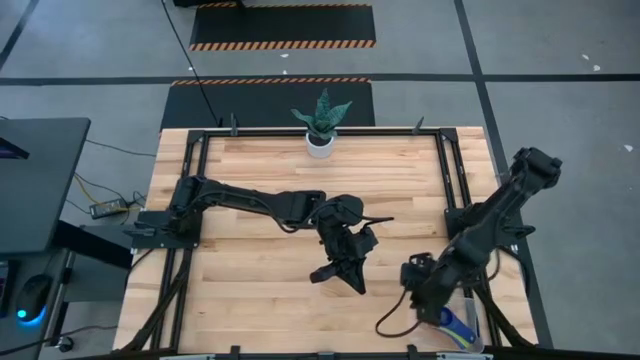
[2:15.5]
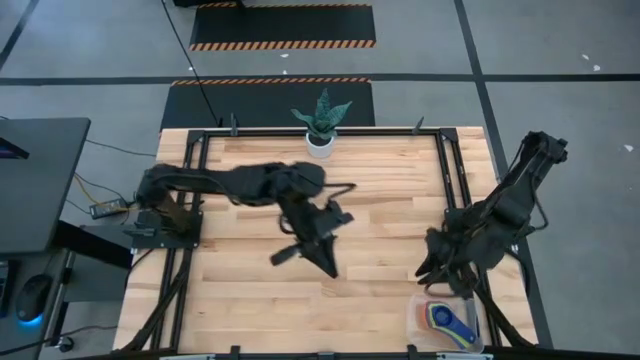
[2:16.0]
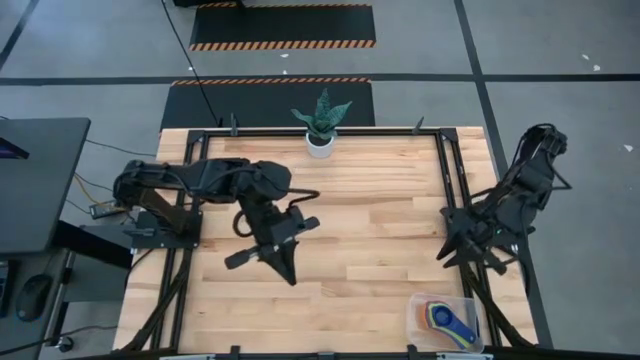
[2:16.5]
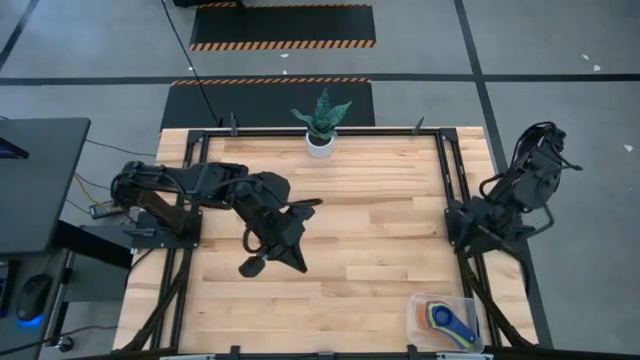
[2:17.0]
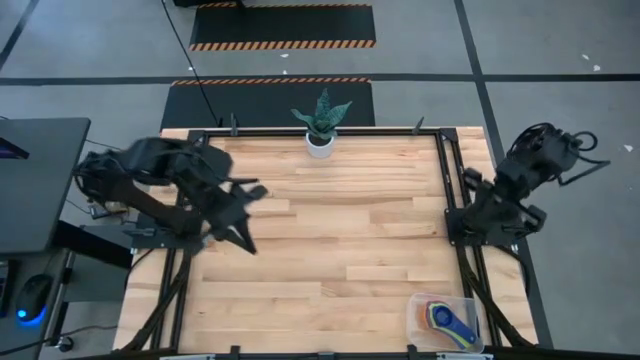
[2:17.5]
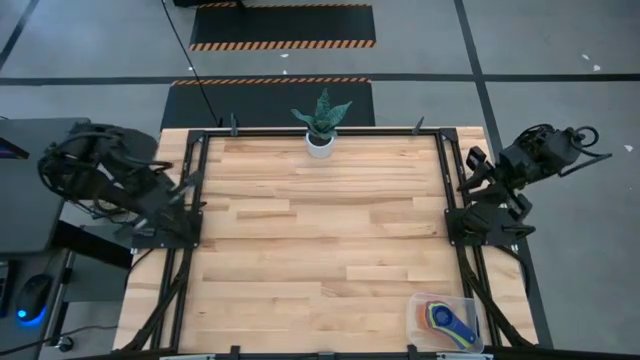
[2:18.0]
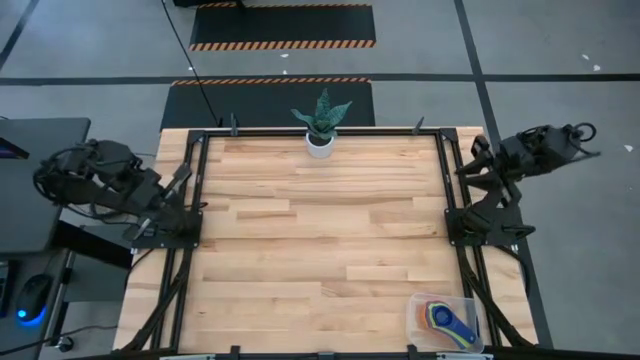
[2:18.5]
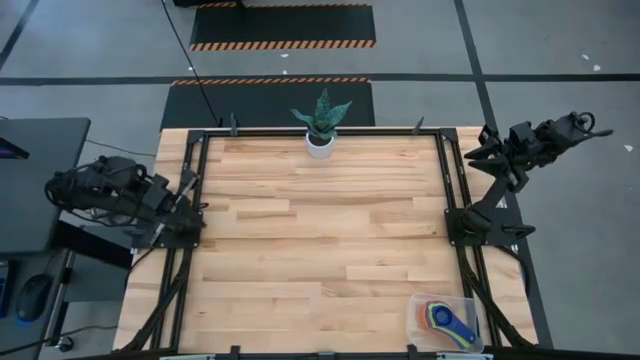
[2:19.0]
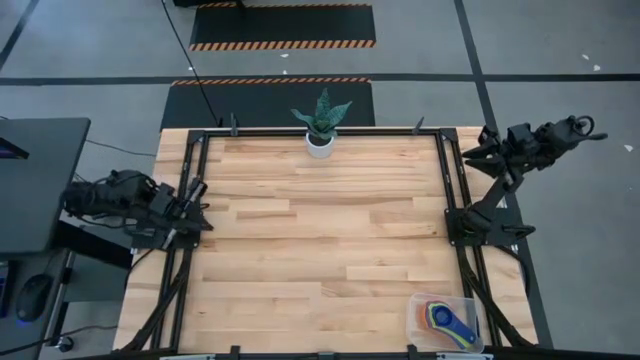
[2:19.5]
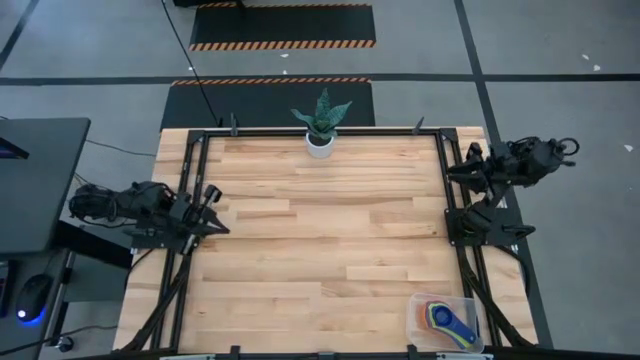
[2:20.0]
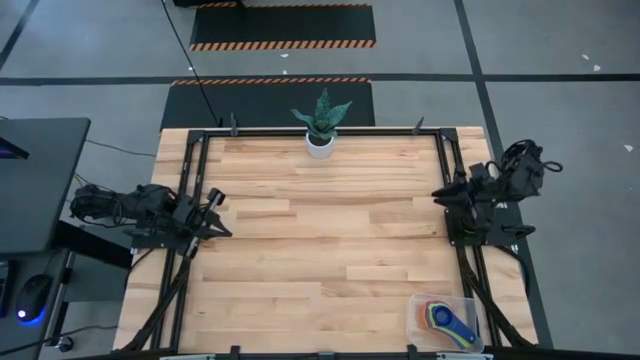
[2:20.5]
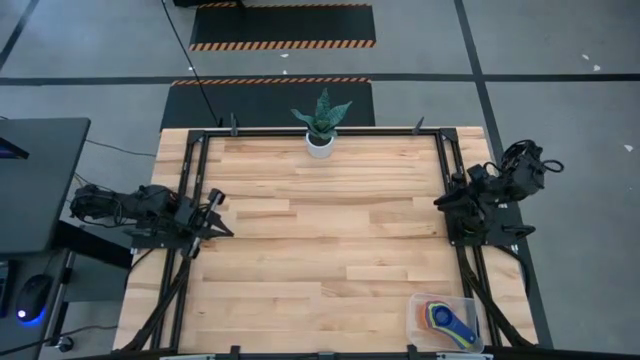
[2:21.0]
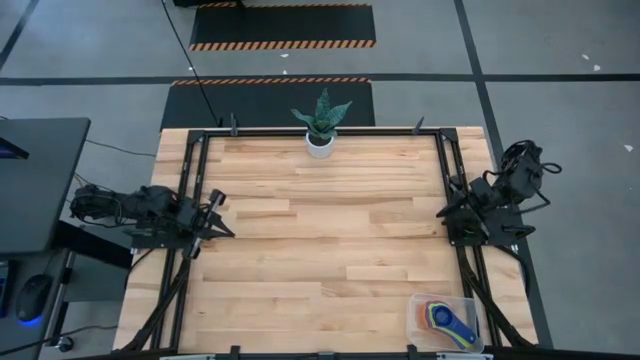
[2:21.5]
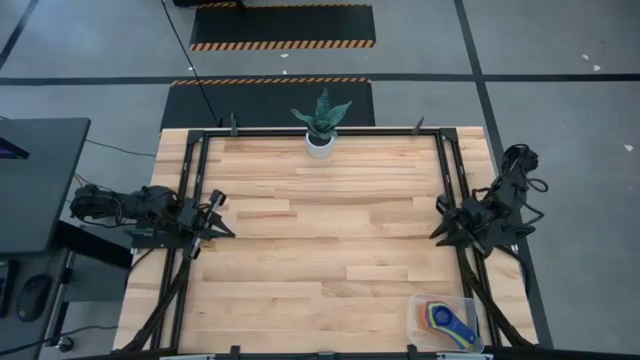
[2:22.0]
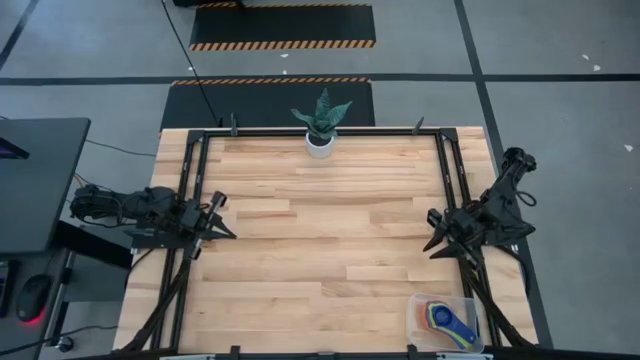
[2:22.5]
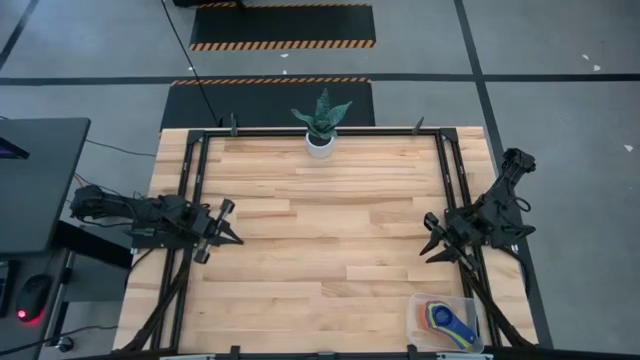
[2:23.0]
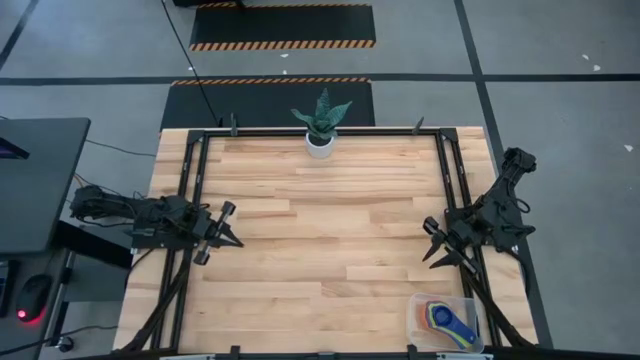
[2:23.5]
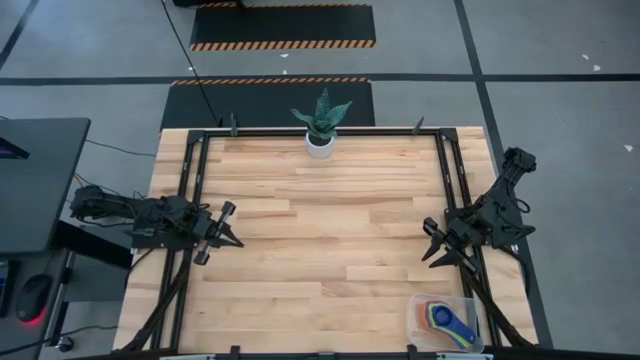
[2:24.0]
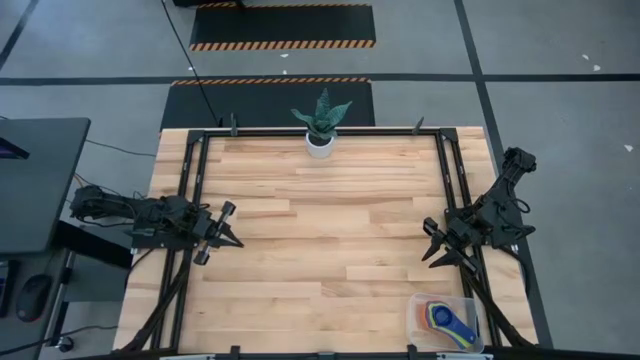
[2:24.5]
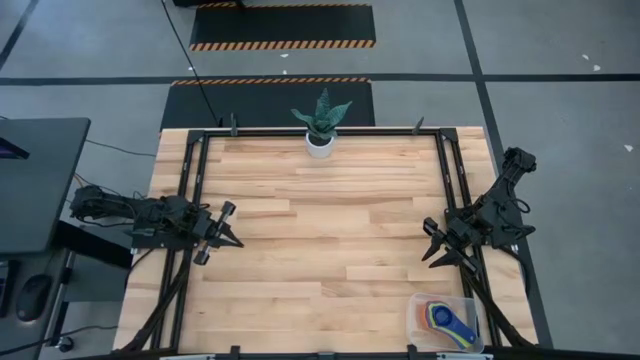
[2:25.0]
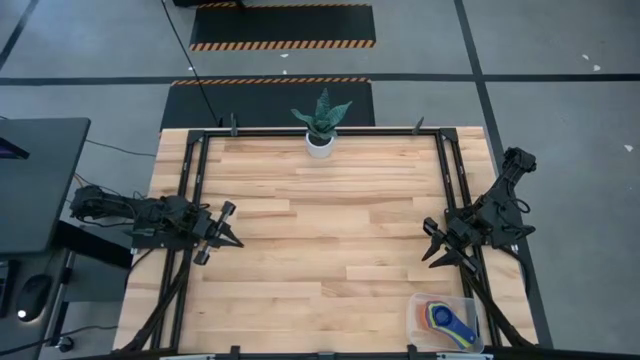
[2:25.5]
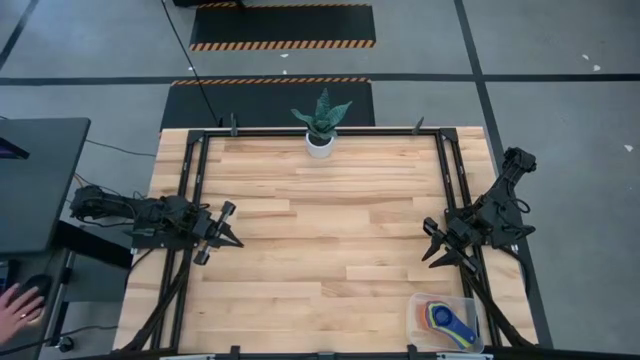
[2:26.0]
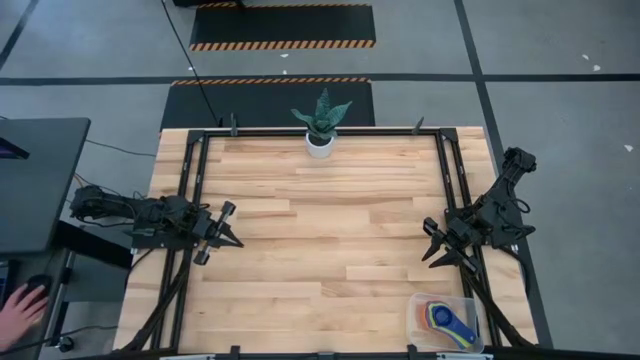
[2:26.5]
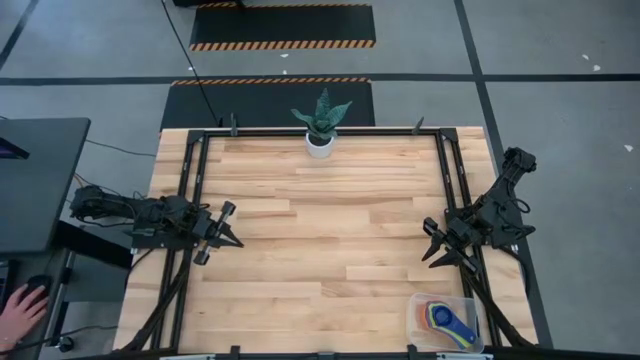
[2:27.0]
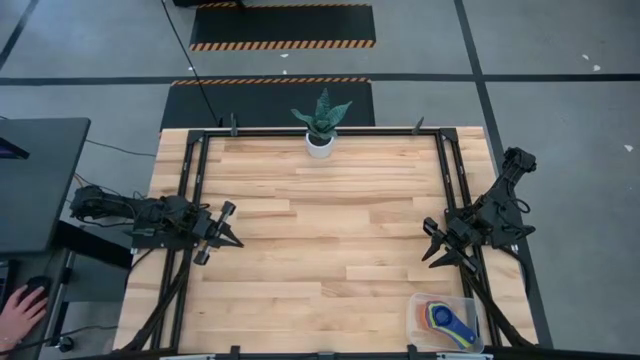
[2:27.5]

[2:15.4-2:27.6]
Task: Nest measuring cups in basket
Return to Home Position

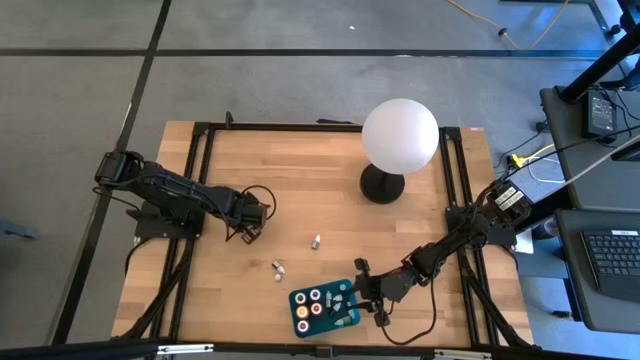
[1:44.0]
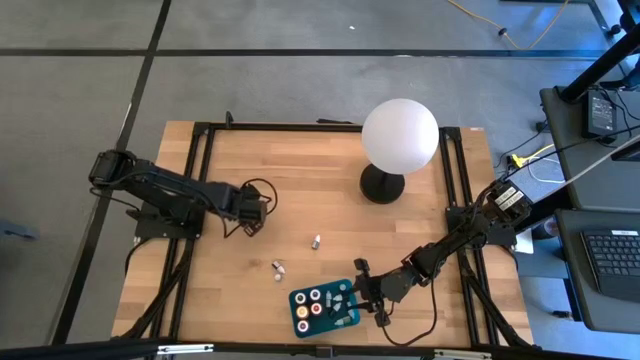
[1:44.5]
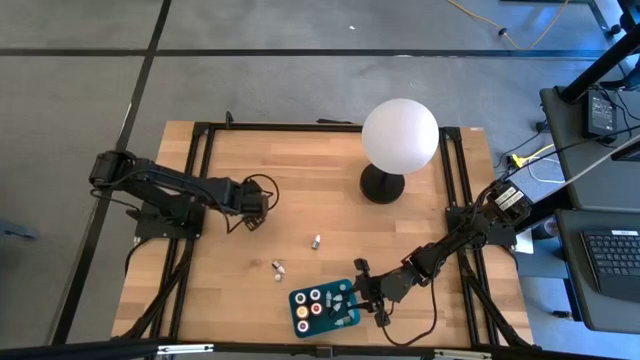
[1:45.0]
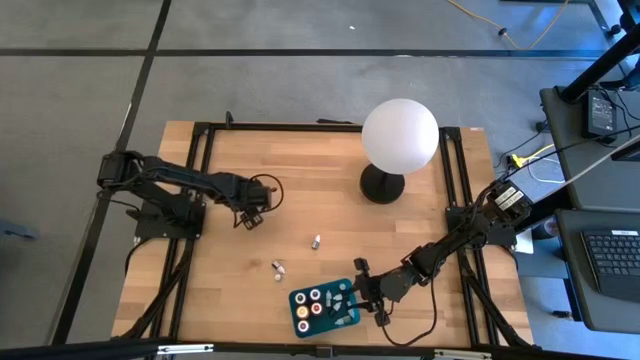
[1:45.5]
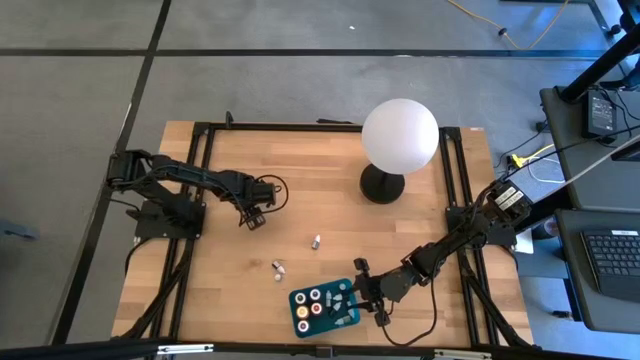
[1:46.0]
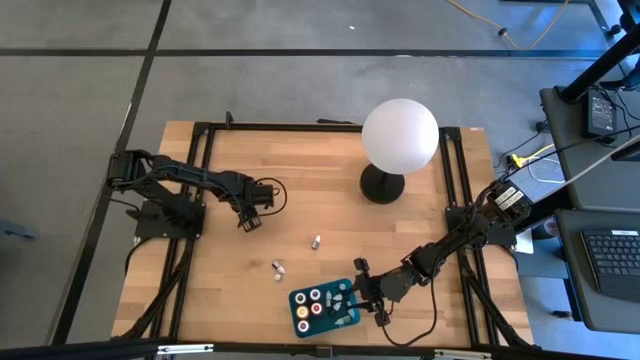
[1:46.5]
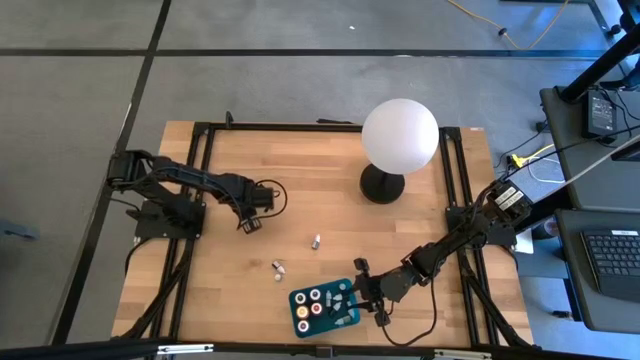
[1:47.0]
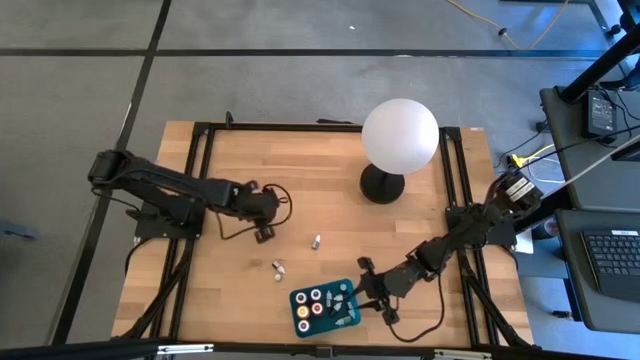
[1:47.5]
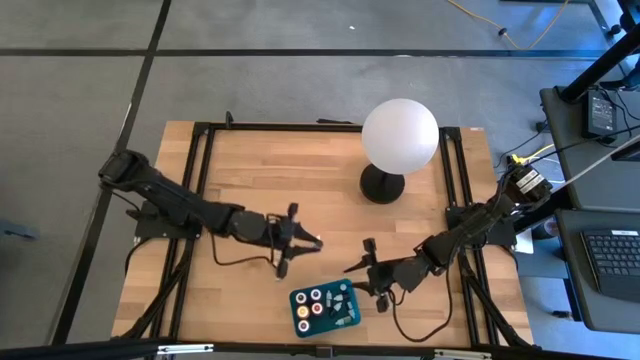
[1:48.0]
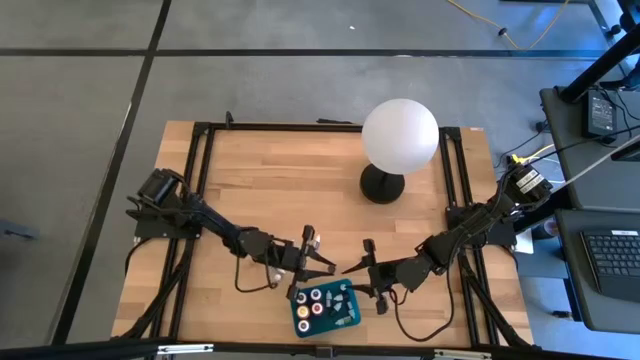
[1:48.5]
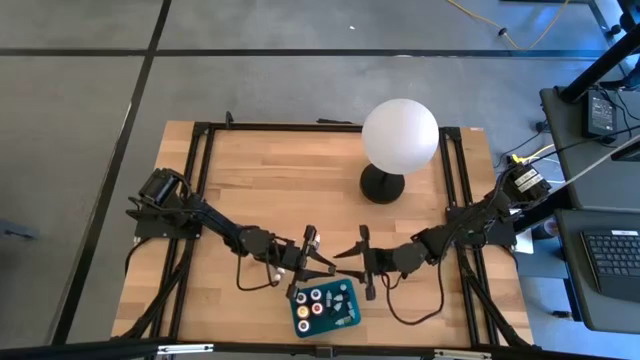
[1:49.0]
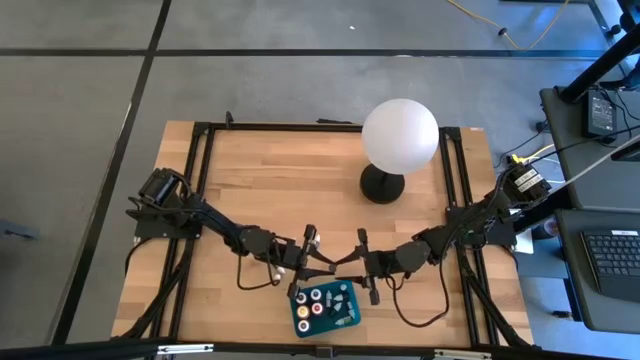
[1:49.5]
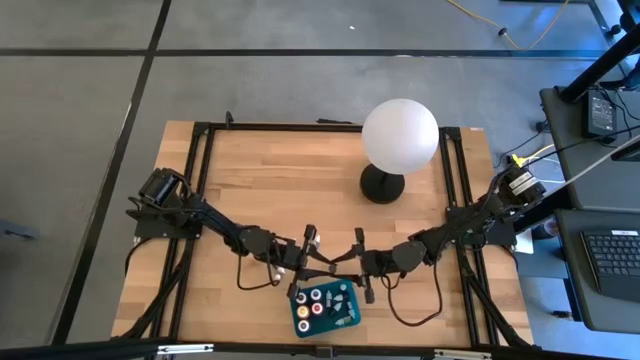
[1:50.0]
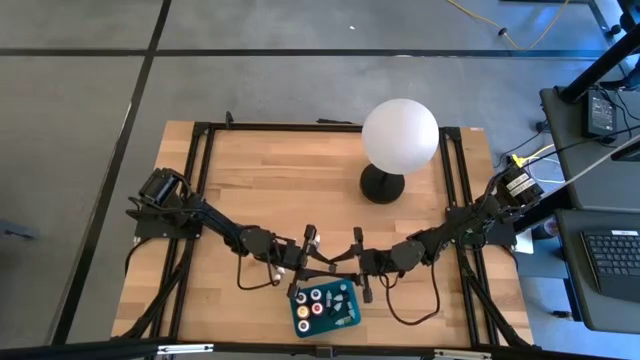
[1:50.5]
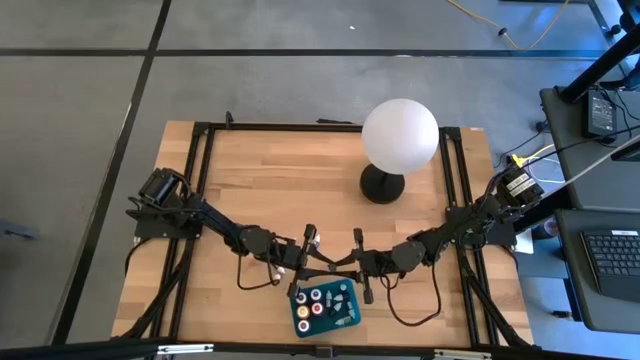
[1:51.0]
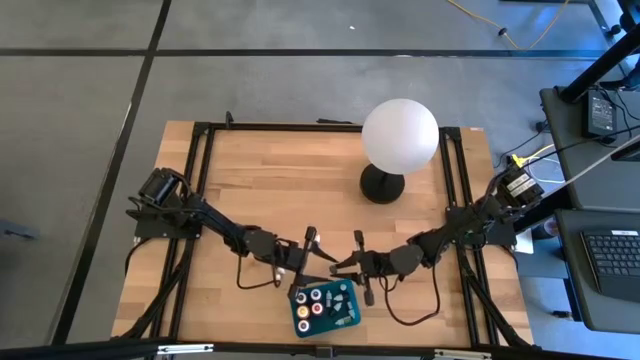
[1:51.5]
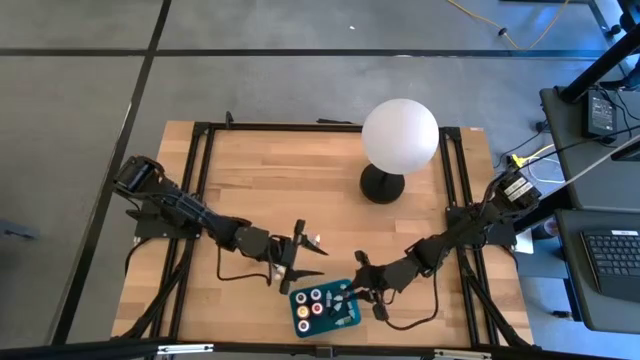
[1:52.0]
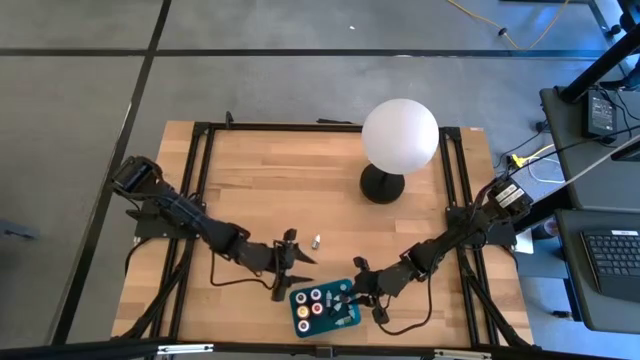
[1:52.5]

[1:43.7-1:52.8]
Task: Pick & Place food coloring
Put the small brown food coloring bottle into the blue bin
